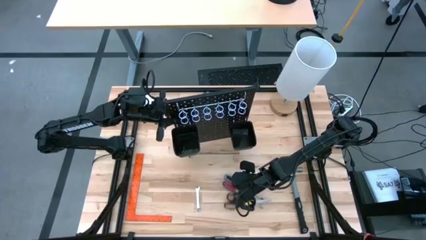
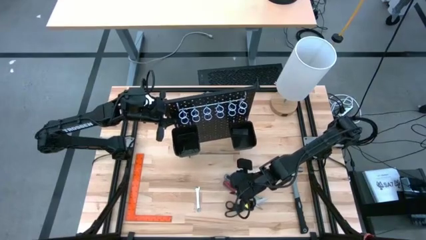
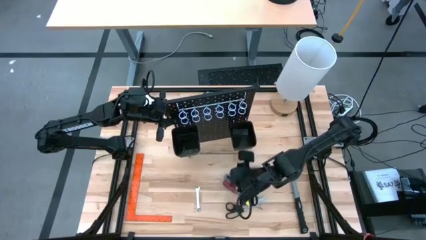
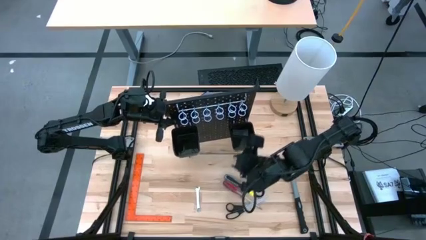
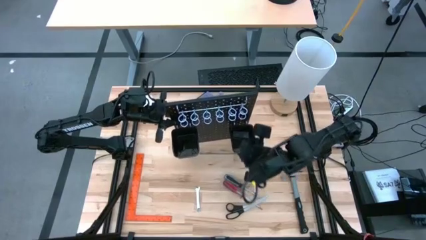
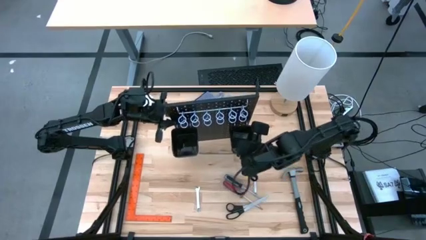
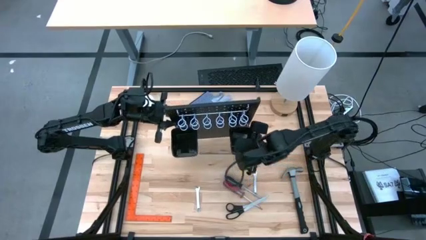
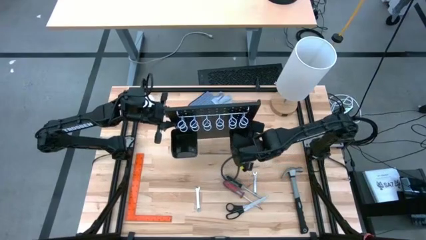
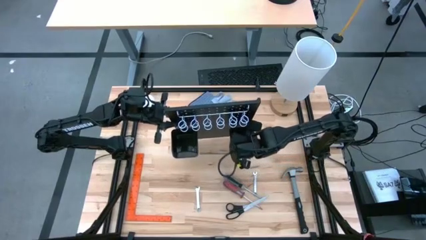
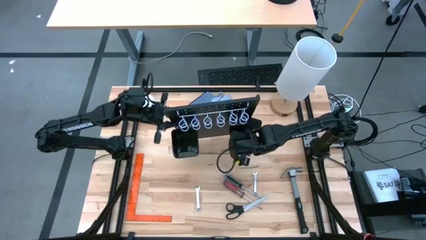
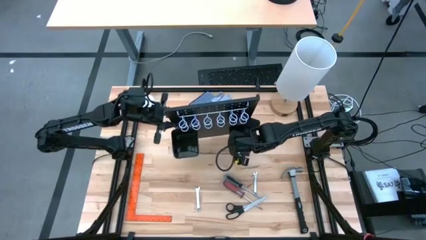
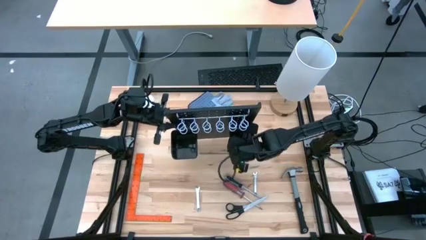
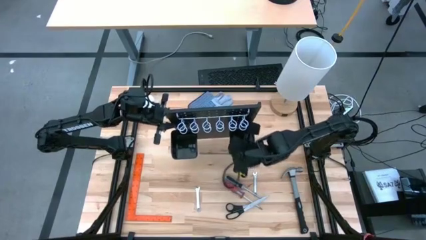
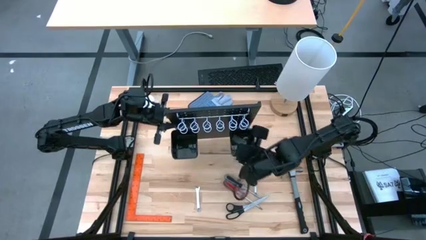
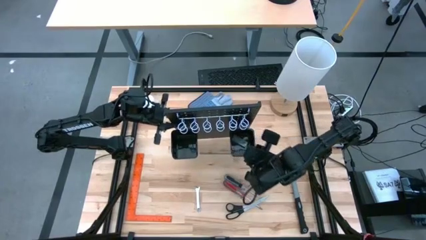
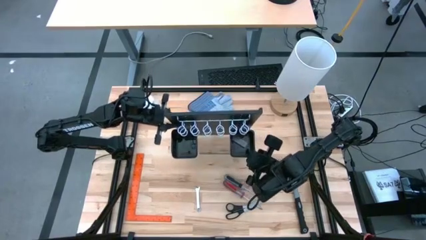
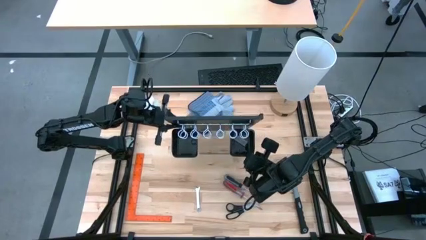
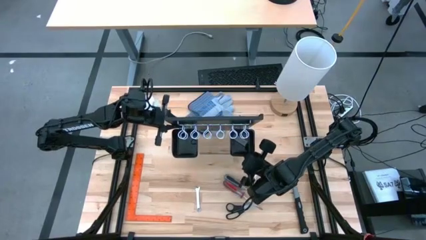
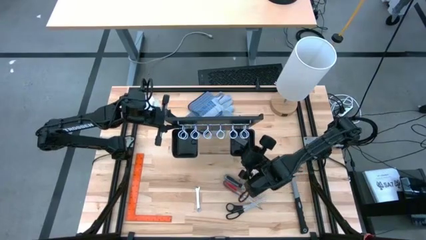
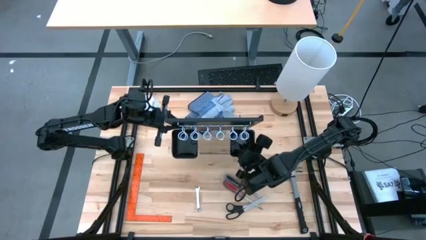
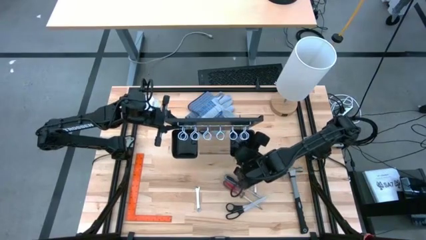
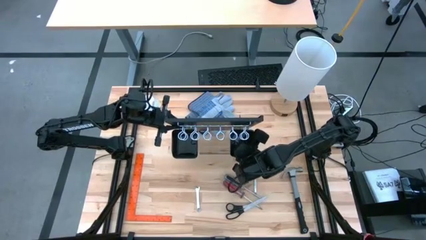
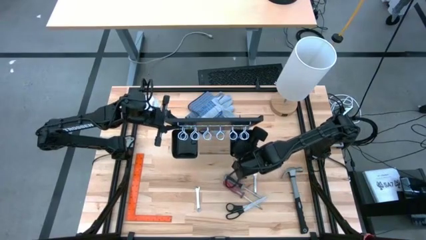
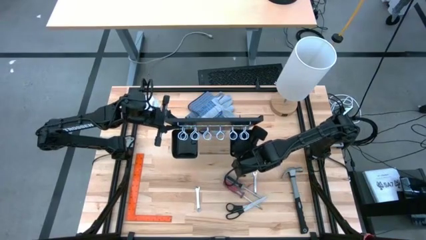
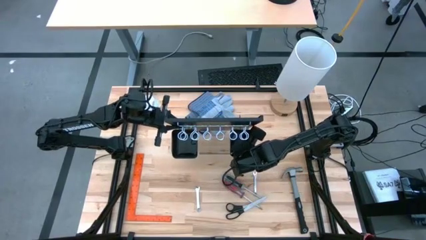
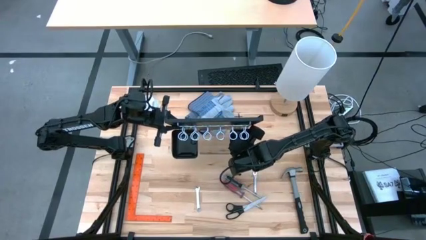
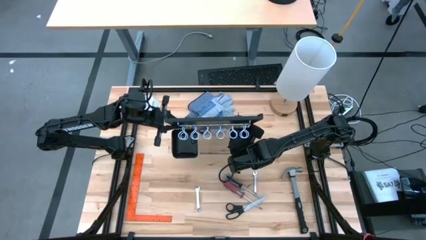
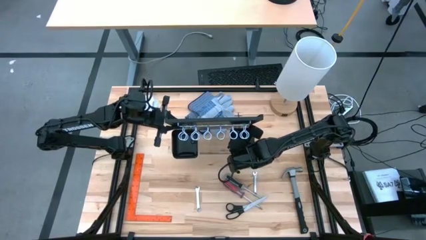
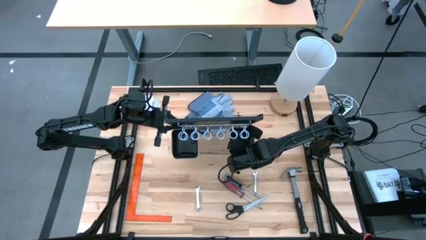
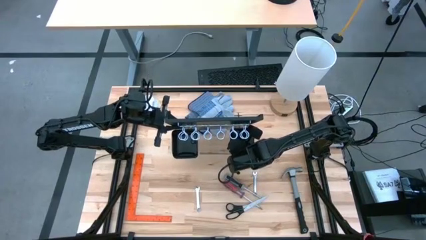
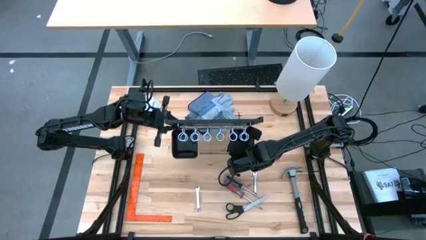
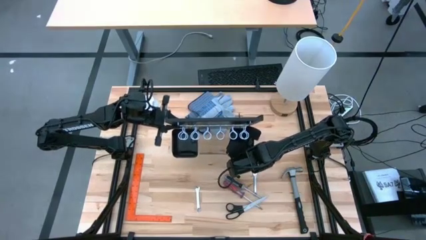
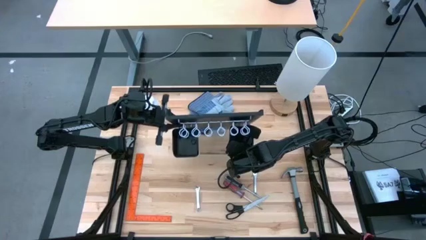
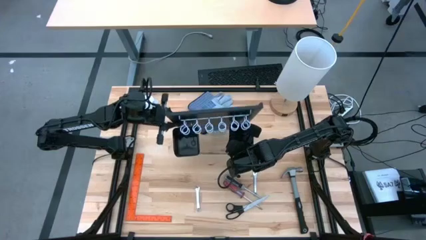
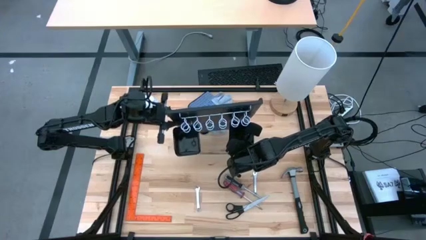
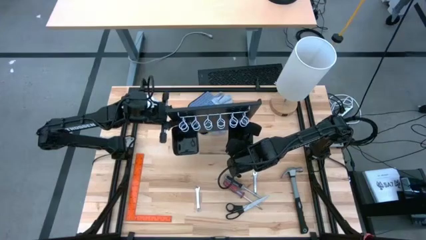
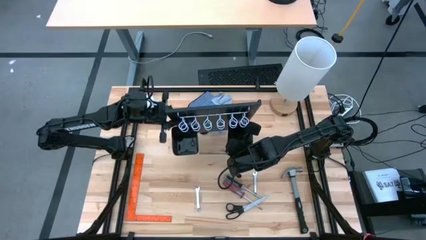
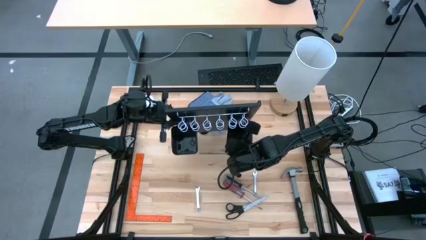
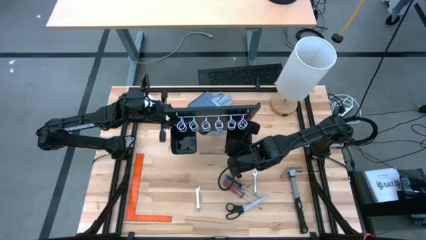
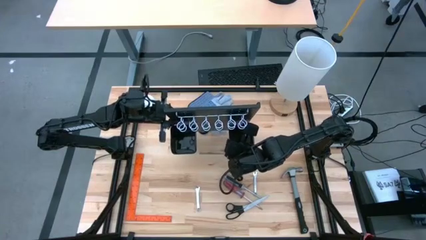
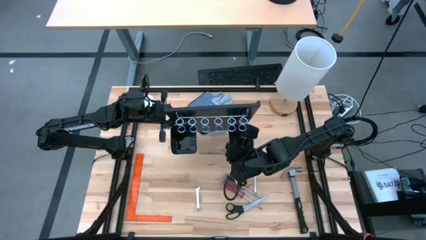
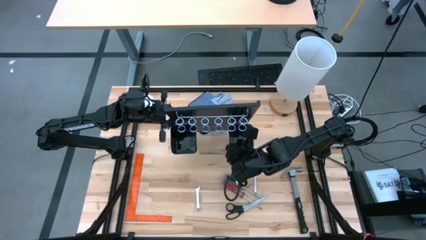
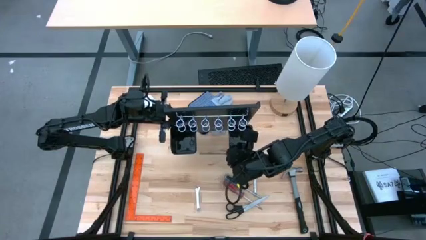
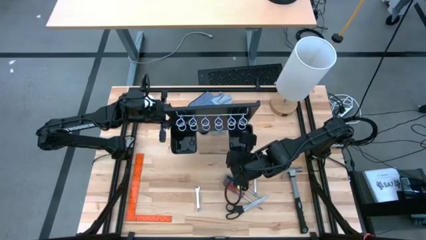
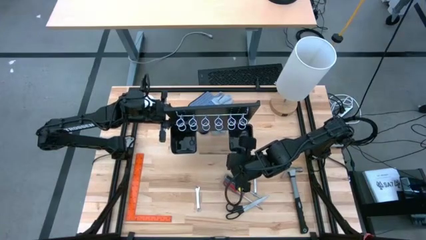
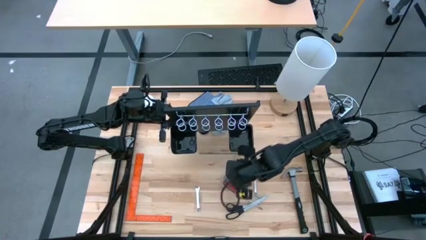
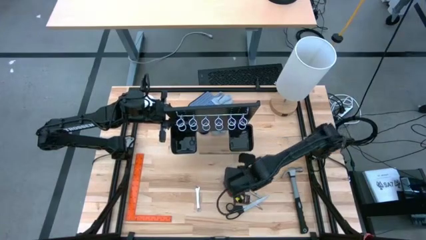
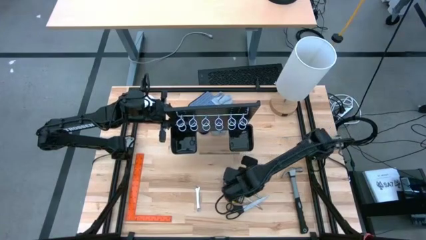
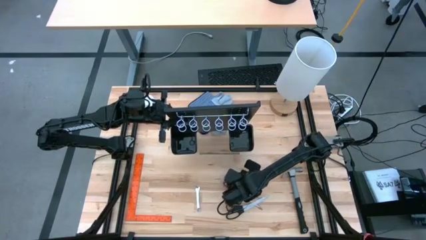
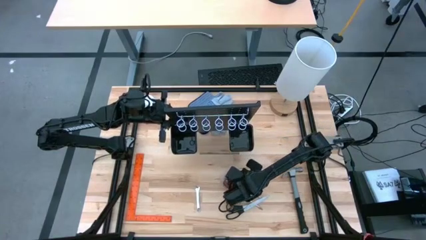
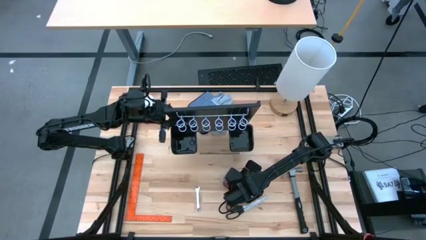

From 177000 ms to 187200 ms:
Task: Hang tools onto peg board
Remove the black strip holder from the right black bin on the black pegboard

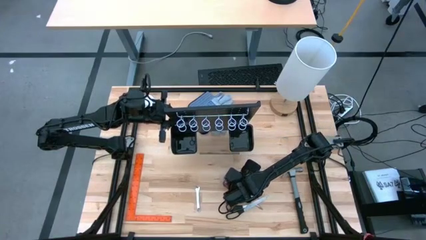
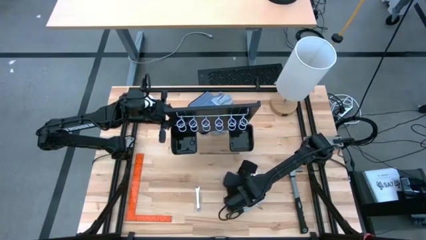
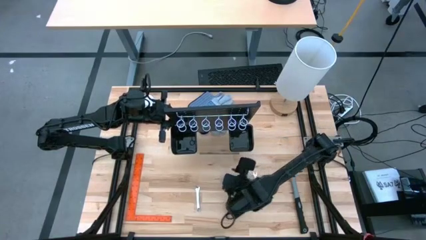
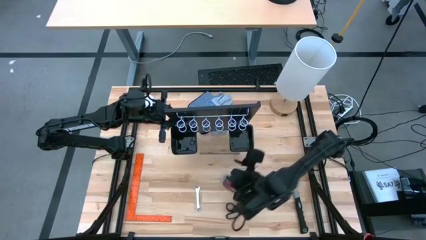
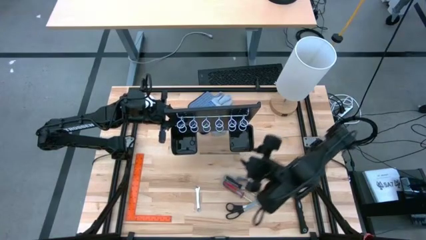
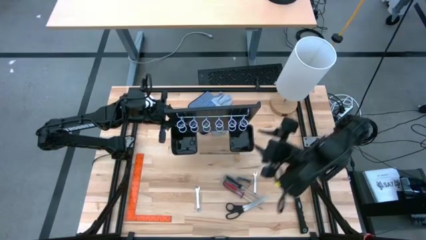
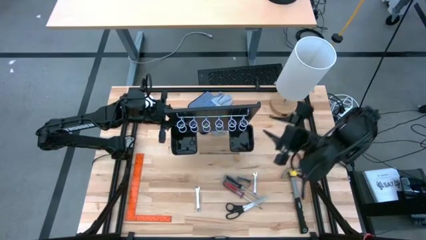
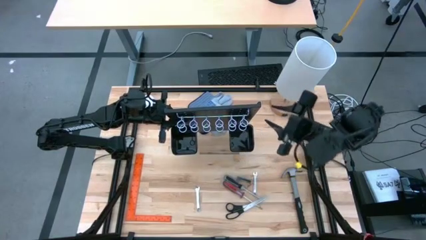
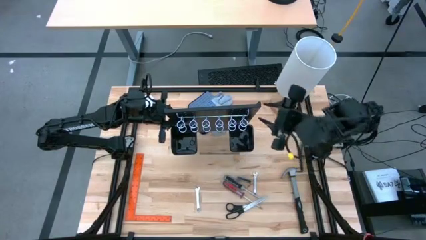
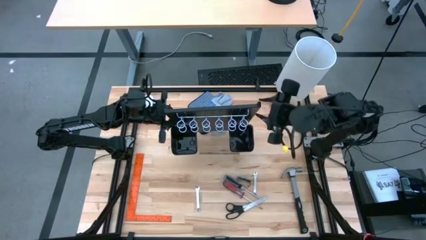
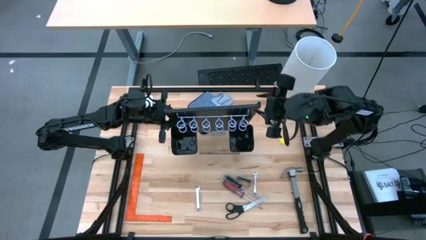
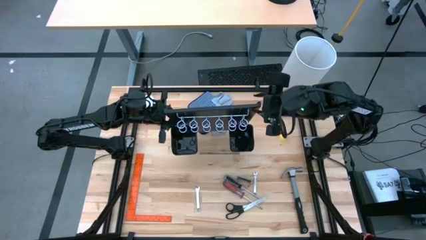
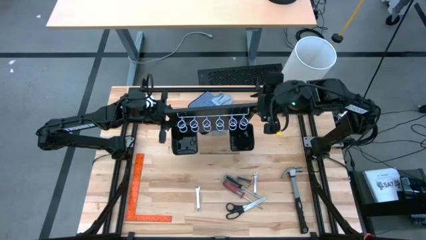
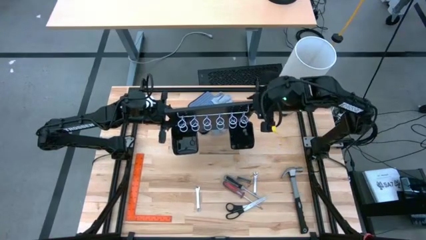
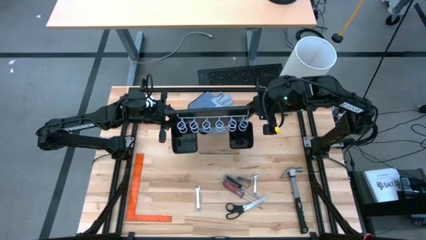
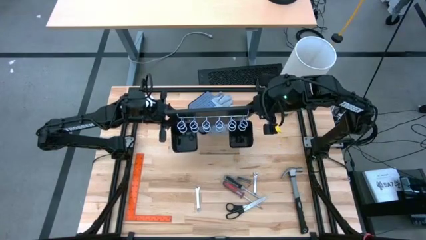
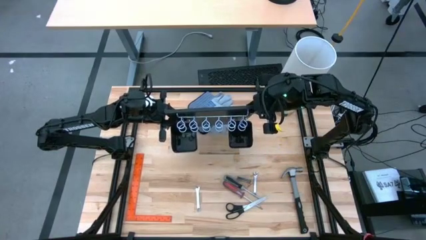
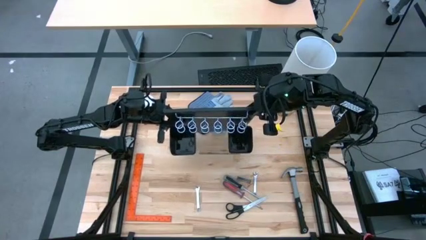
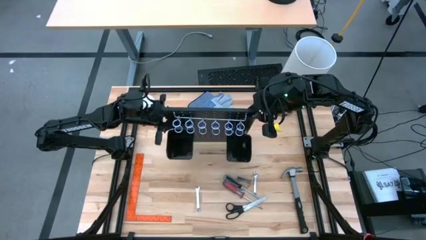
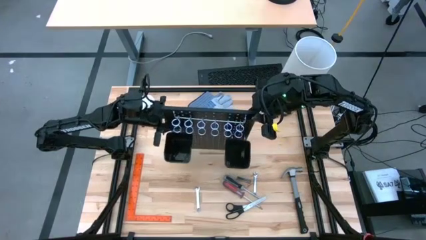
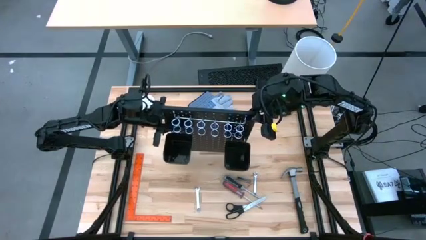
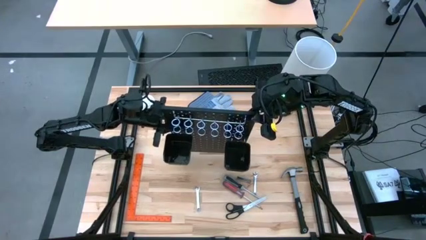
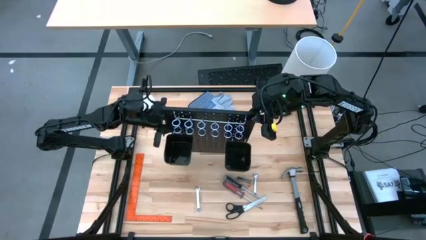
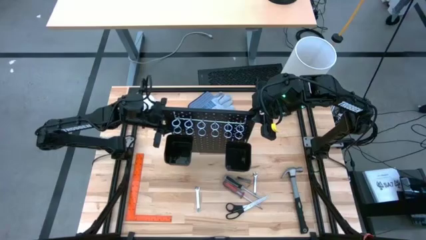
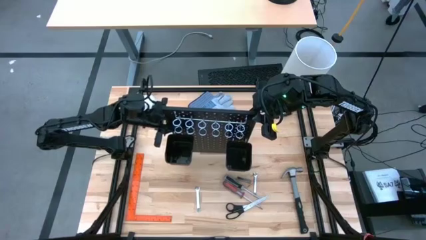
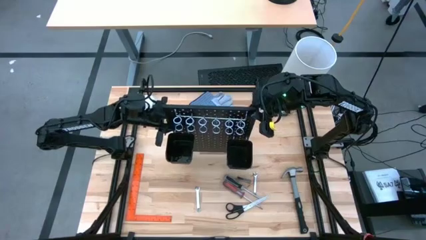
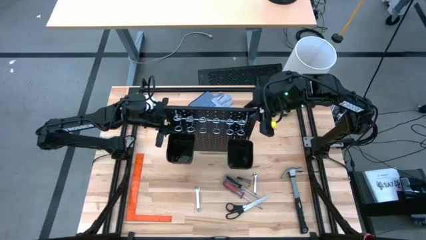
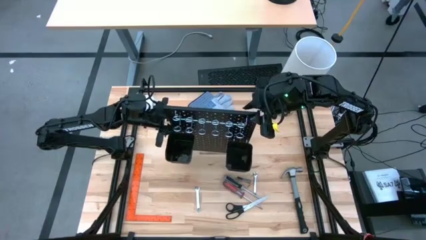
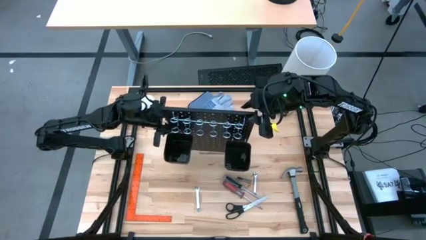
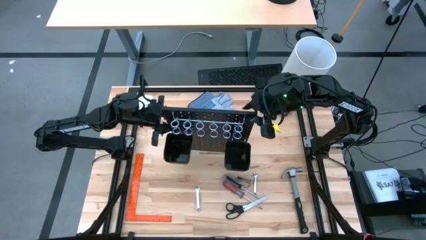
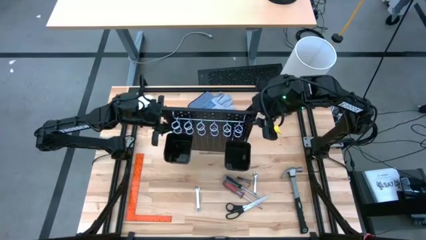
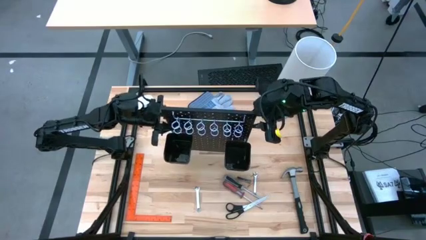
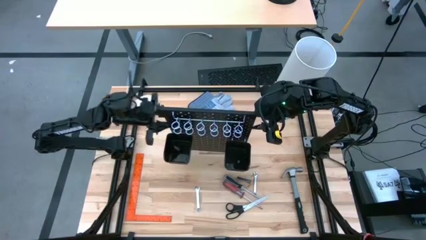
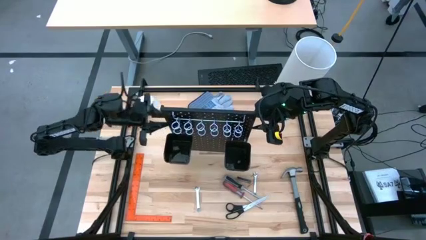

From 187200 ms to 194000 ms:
Adjust the black pegboard on the table
